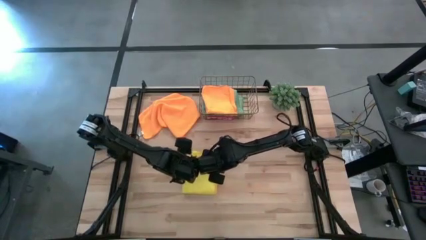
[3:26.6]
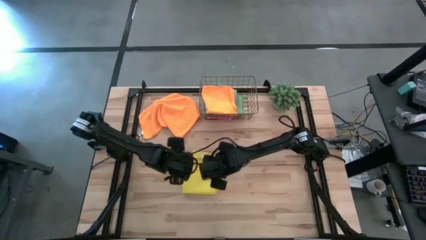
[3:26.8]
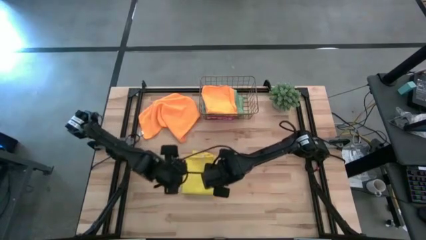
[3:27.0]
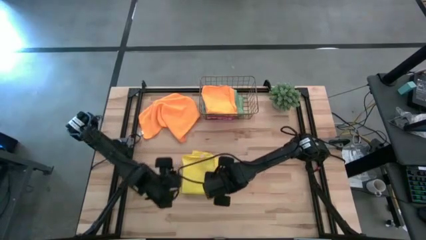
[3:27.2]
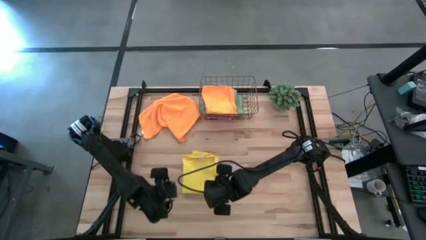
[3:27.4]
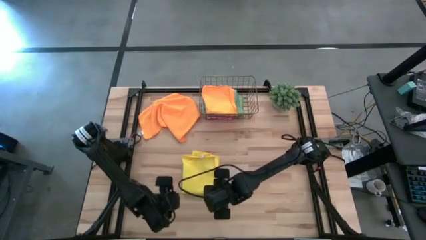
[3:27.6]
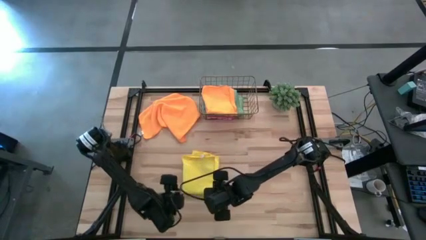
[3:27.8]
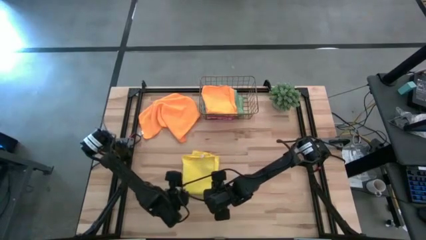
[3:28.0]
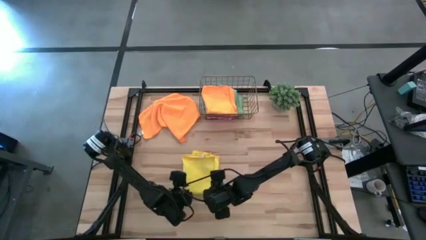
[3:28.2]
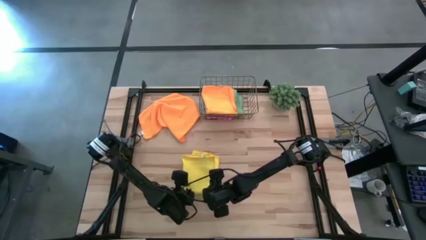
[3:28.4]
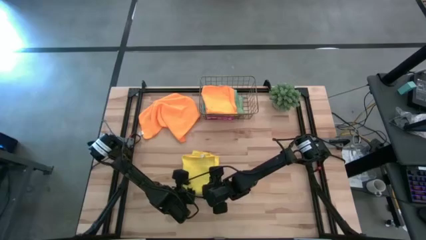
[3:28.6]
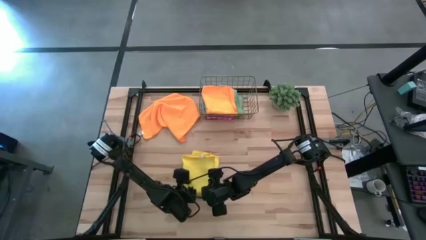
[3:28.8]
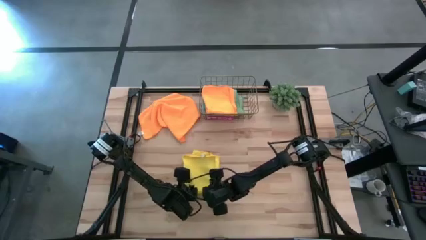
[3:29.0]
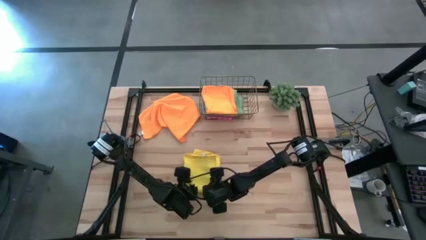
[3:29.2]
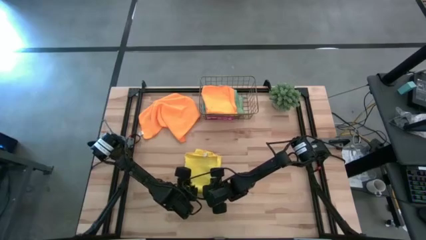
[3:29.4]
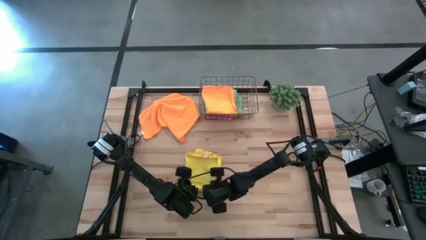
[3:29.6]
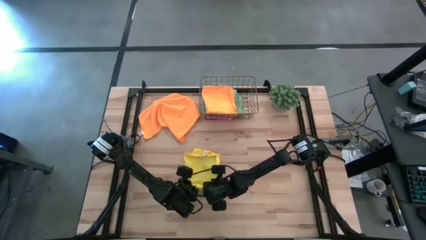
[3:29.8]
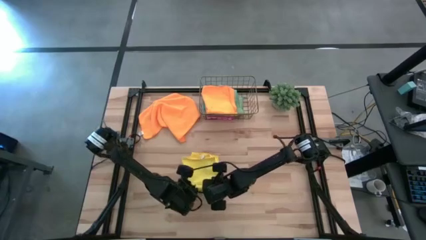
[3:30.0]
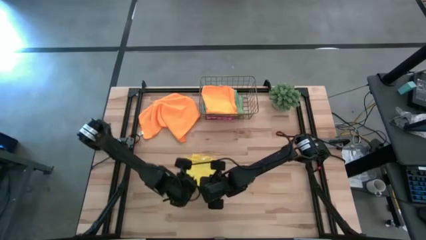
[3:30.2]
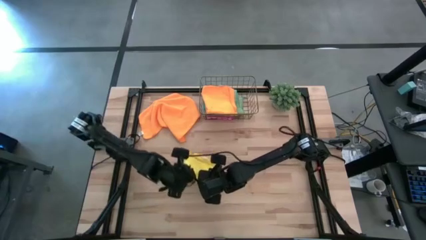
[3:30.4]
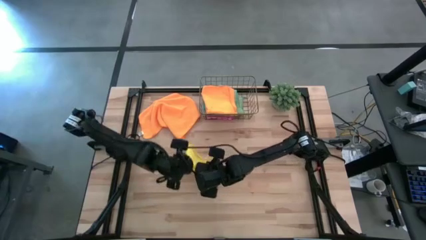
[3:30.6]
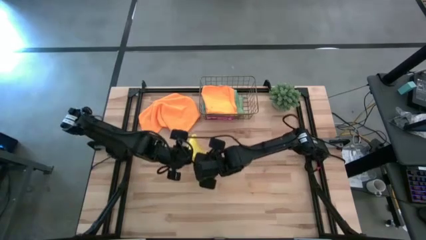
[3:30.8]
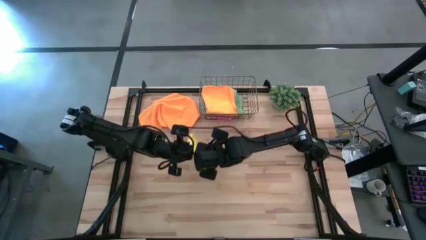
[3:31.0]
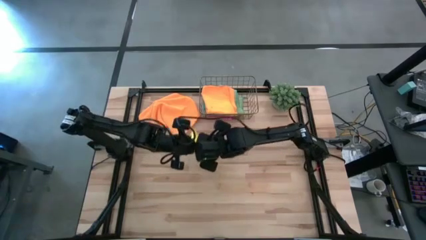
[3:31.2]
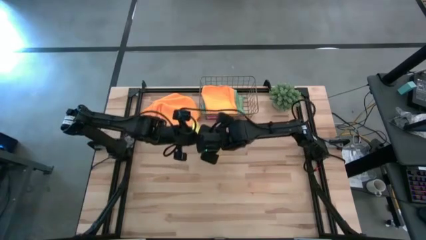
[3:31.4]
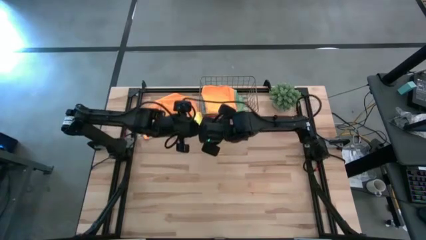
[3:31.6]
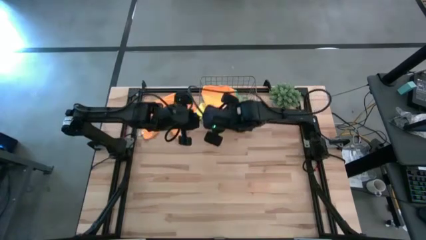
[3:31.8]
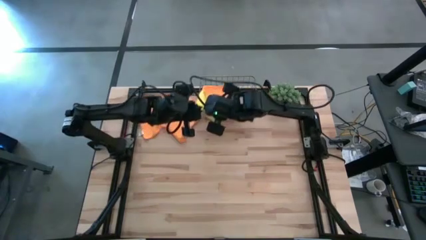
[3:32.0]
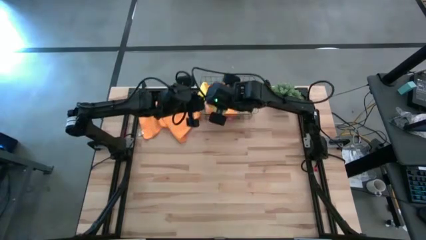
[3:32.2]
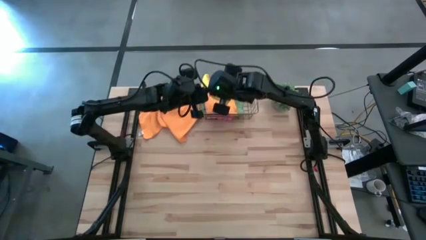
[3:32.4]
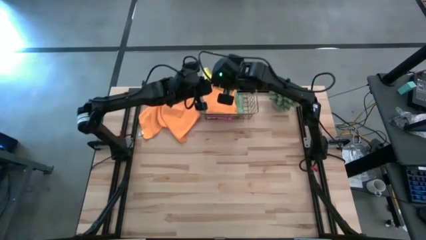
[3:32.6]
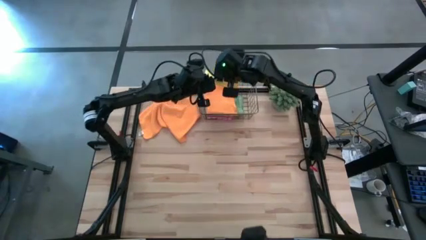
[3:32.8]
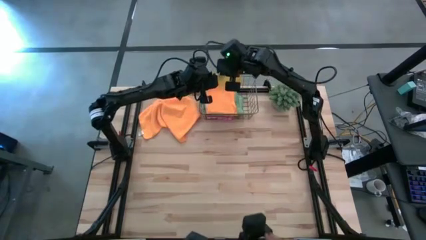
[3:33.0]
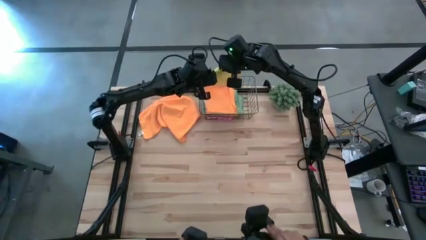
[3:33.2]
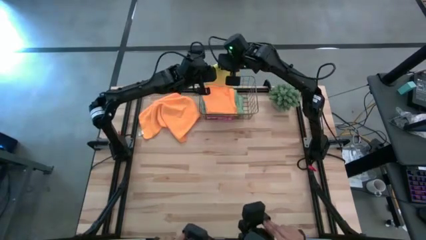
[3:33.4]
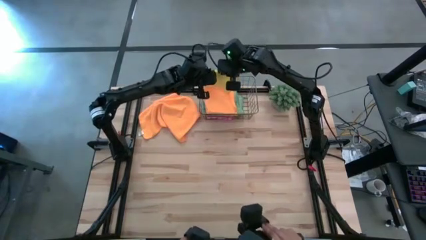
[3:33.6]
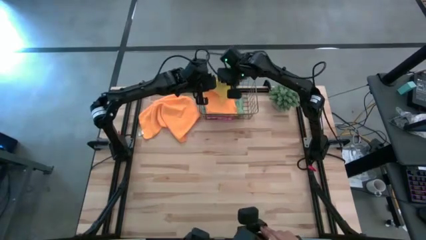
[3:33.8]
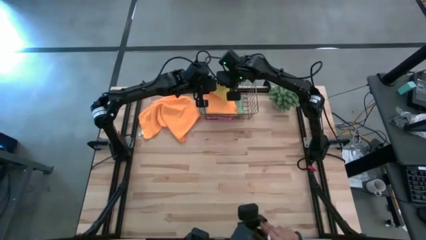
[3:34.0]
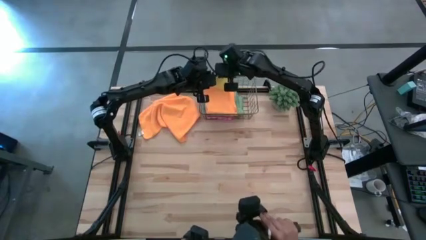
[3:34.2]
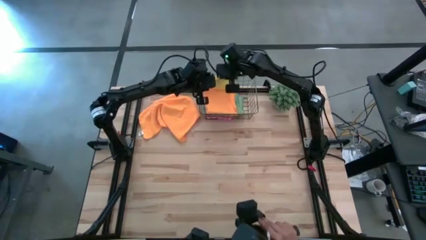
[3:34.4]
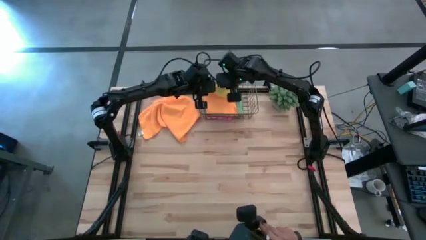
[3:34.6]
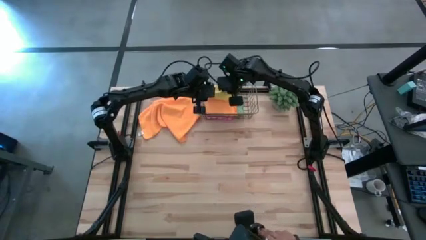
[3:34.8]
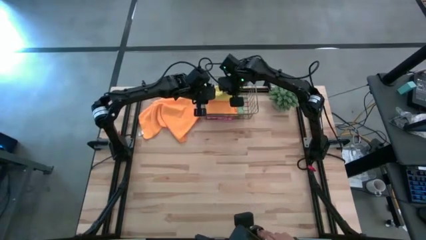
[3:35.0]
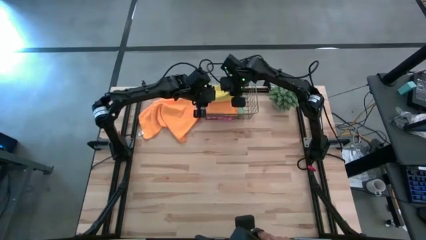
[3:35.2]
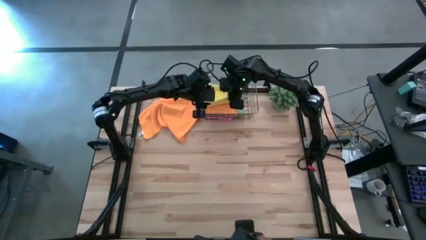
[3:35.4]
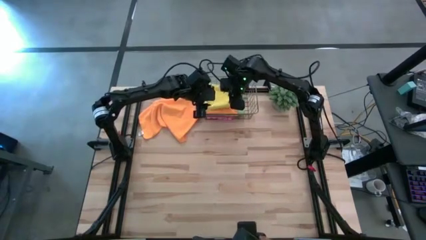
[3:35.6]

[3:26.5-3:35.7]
Task: Fold microfiber towels
Stack the folded yellow microfiber cloth on top of the folded orange microfiber cloth

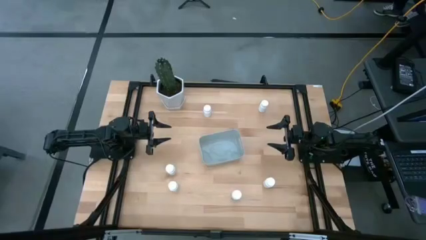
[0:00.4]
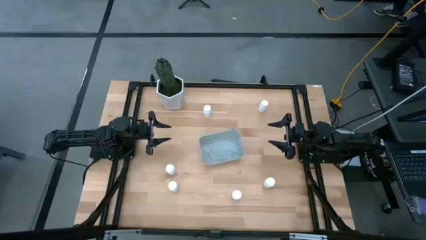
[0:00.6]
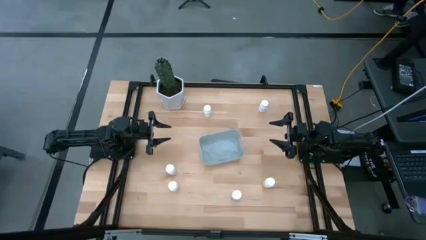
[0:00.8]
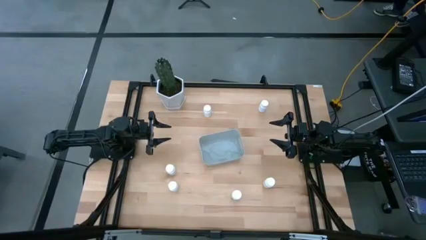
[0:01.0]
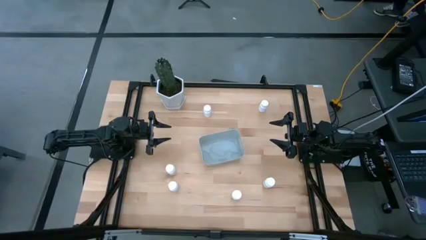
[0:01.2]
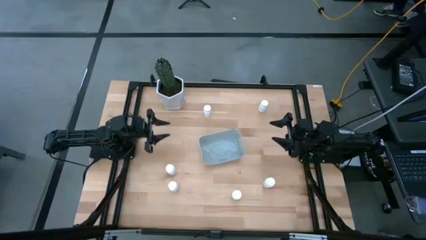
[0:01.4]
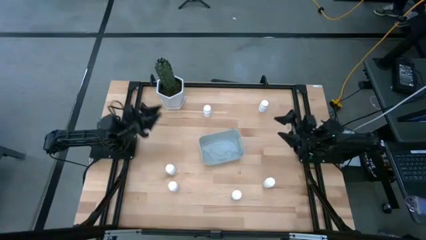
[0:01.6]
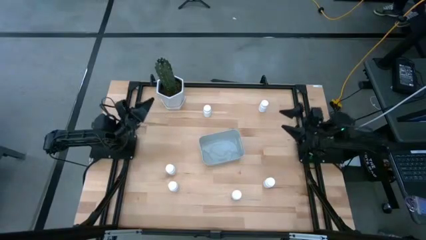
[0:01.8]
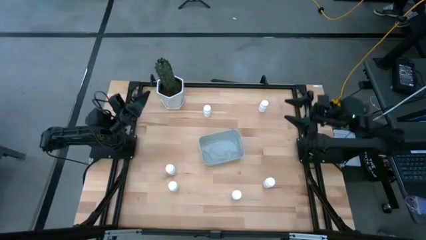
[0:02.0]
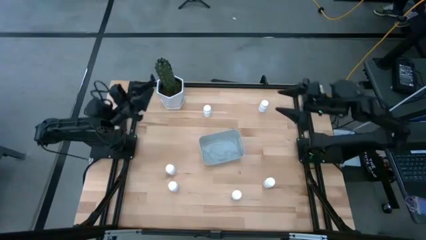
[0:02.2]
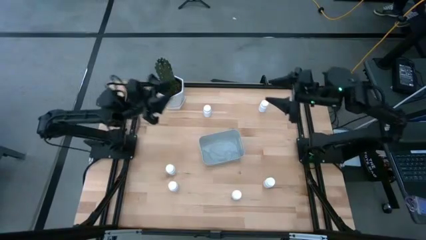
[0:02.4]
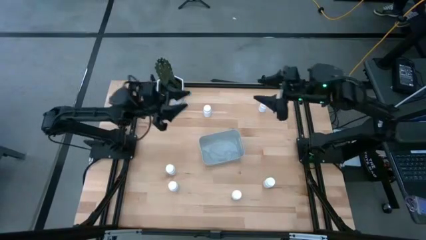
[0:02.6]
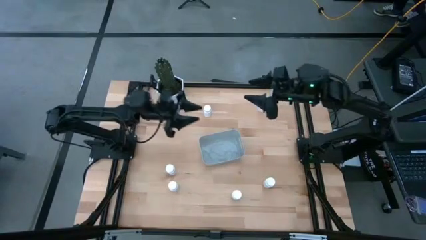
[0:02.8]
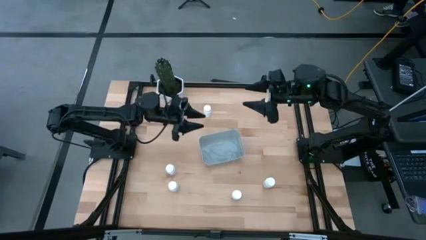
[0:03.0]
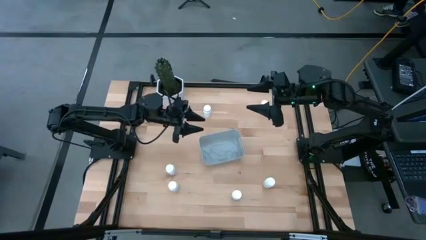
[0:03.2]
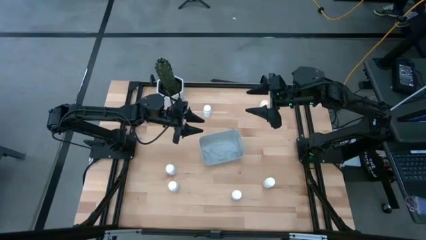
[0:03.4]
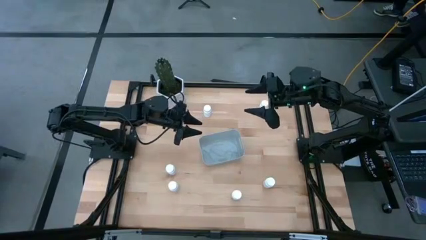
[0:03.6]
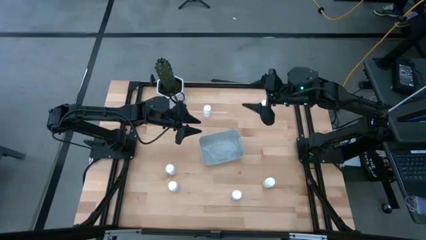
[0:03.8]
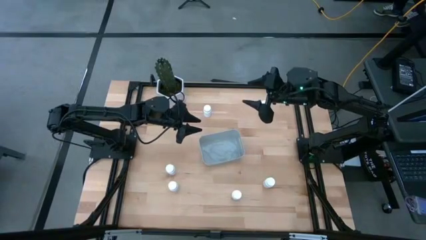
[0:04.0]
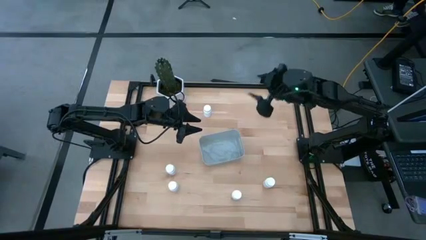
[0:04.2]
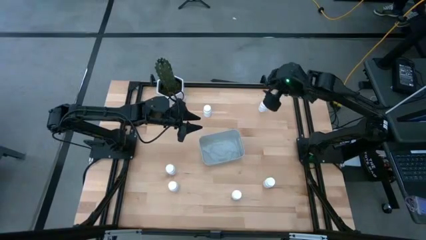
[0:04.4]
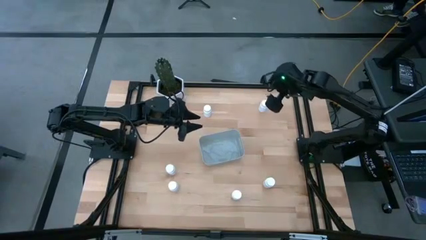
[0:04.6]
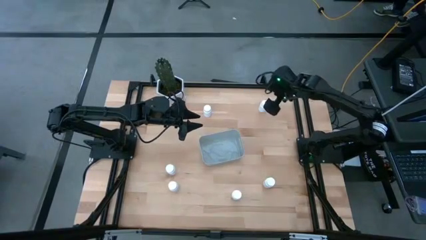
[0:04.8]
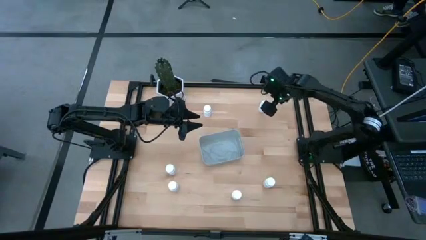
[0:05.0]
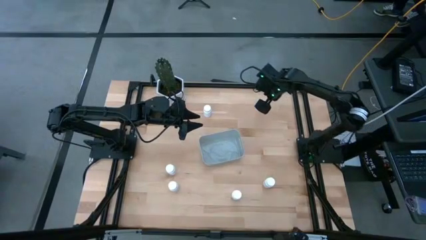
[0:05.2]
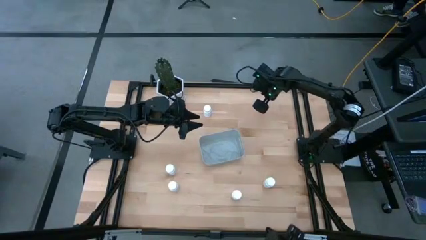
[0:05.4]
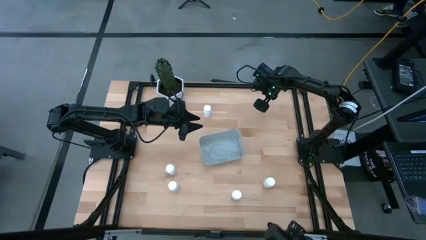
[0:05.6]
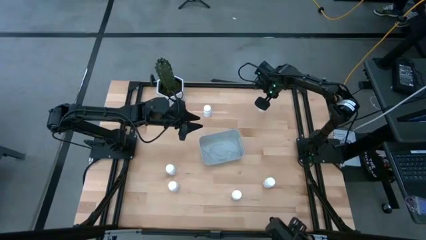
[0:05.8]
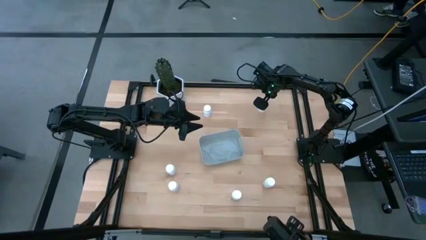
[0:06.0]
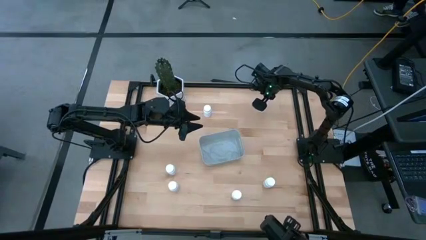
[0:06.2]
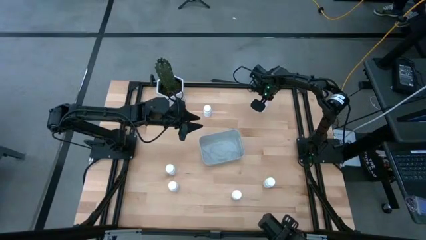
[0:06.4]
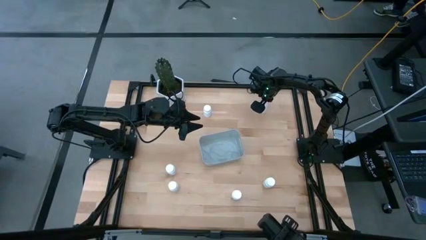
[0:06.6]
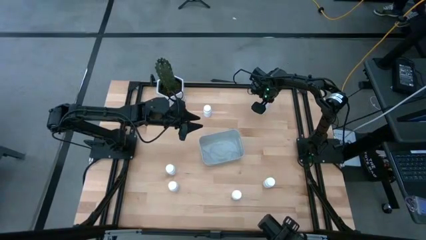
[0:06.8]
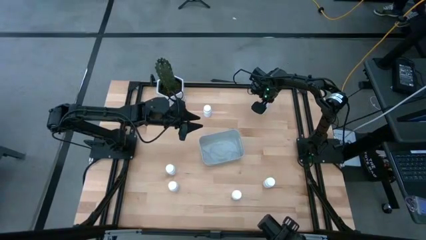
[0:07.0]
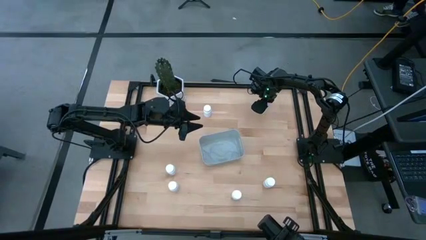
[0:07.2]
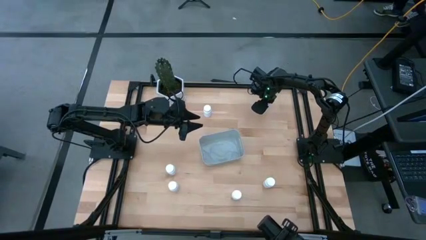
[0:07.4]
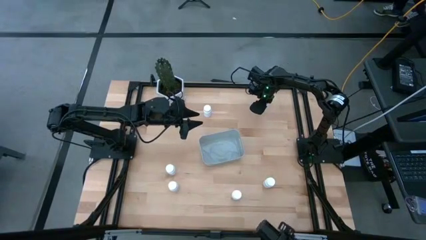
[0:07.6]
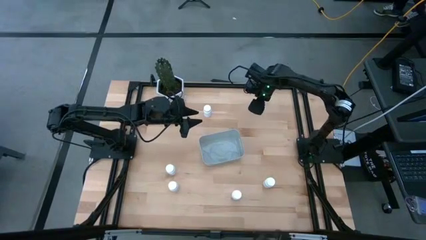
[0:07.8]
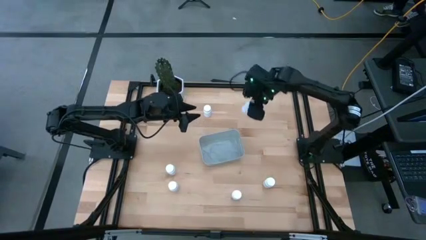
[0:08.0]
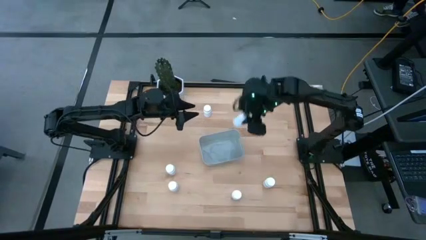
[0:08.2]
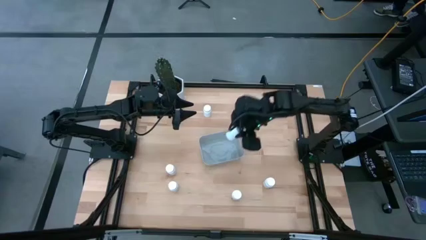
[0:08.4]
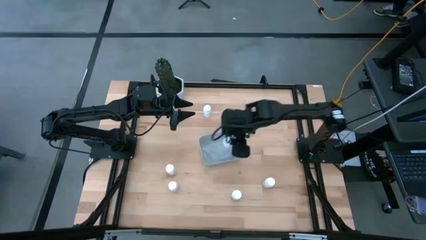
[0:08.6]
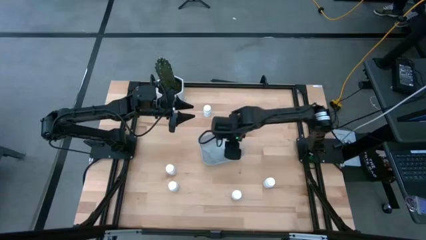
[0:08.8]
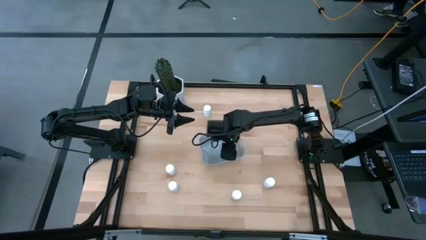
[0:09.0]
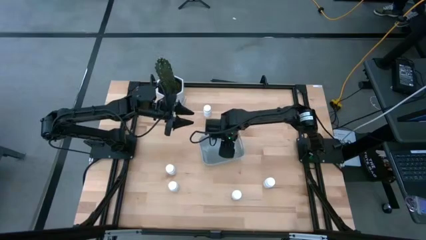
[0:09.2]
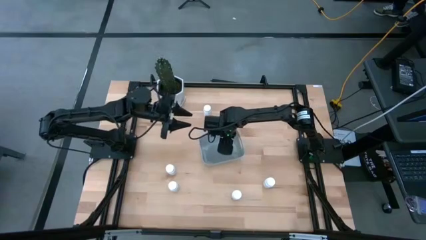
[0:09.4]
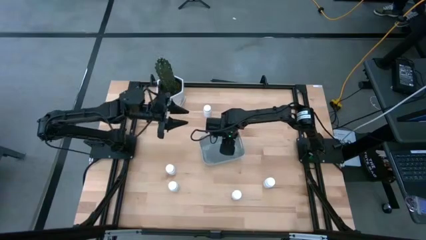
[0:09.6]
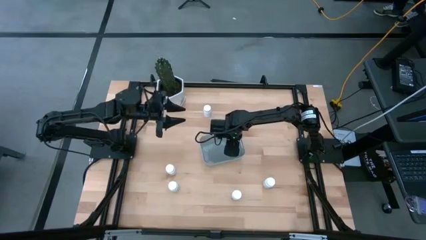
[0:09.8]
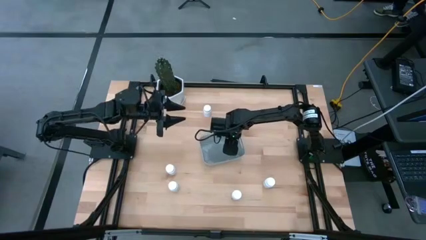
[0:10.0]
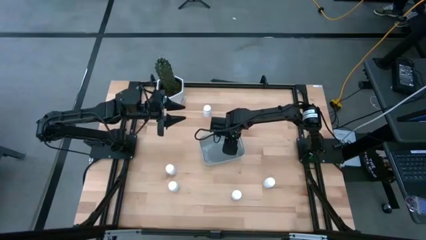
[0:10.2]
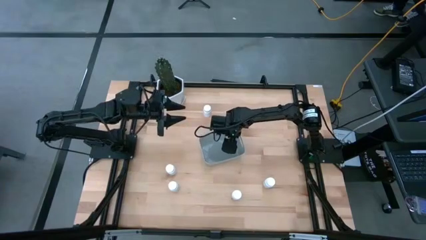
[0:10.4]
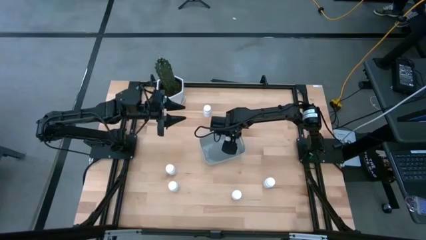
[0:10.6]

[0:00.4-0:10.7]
Task: Pick and place pill bottles into a basket
Put the white pill bottle into the gray bin
